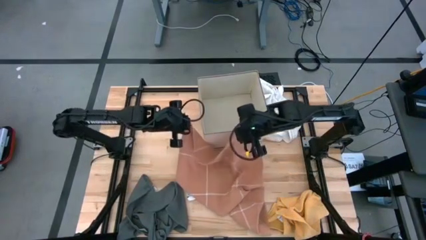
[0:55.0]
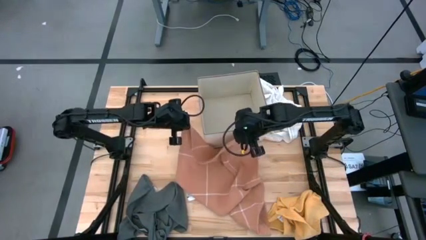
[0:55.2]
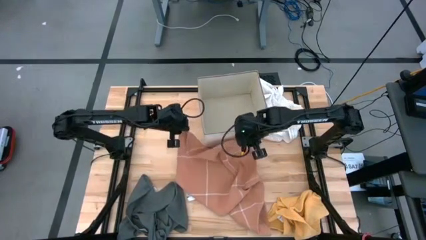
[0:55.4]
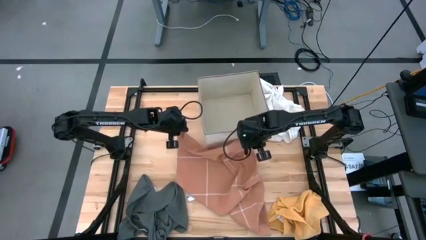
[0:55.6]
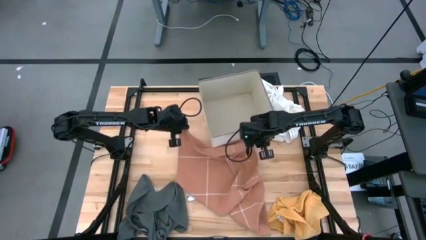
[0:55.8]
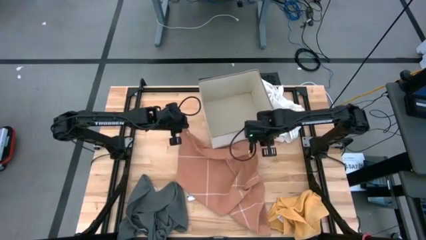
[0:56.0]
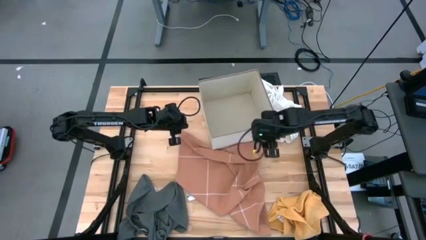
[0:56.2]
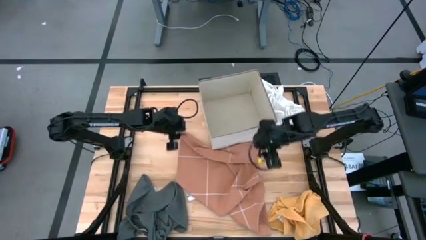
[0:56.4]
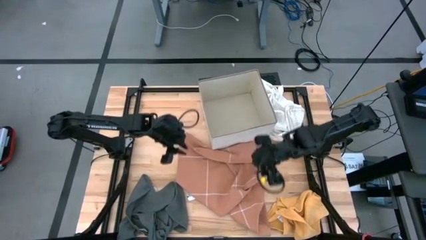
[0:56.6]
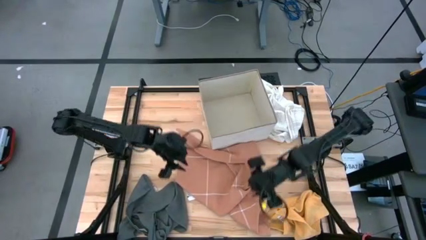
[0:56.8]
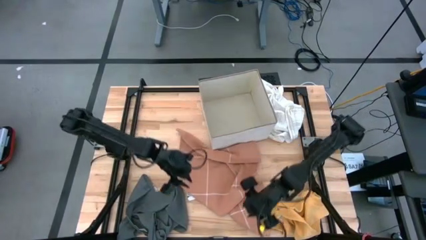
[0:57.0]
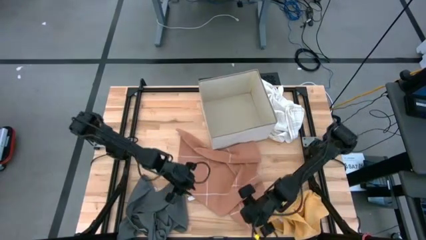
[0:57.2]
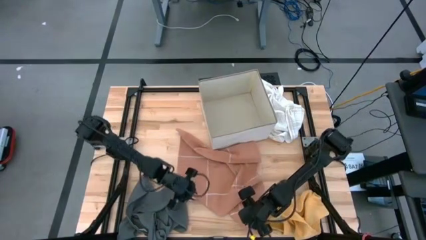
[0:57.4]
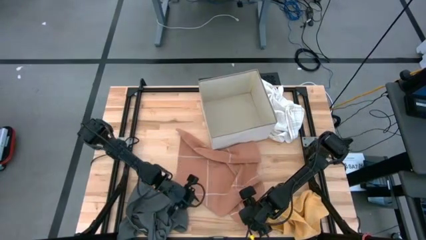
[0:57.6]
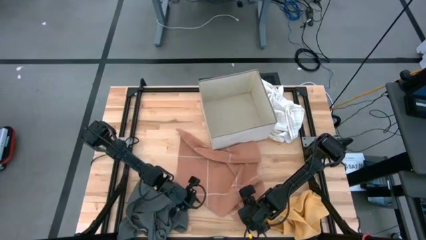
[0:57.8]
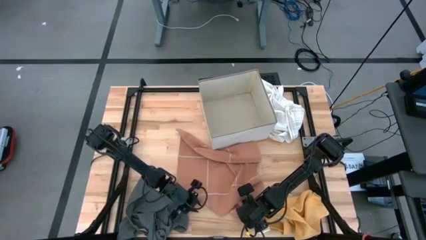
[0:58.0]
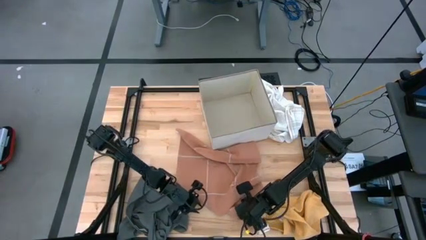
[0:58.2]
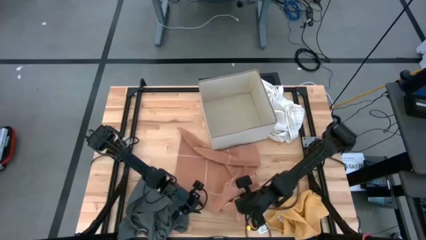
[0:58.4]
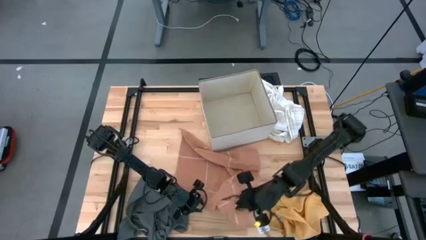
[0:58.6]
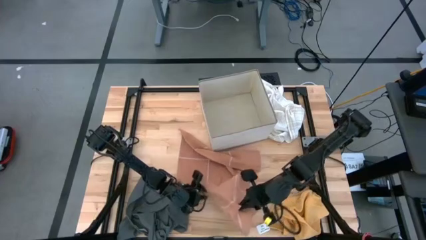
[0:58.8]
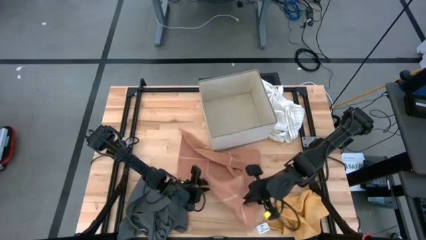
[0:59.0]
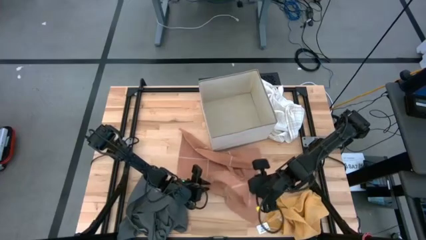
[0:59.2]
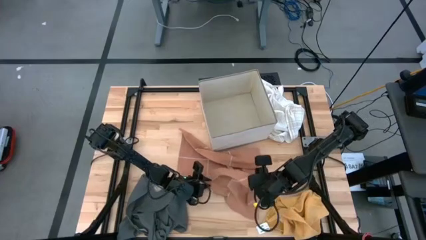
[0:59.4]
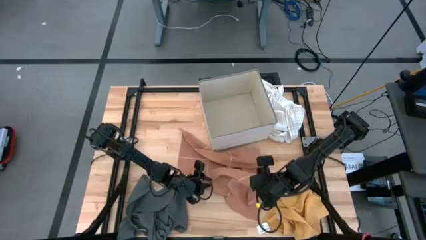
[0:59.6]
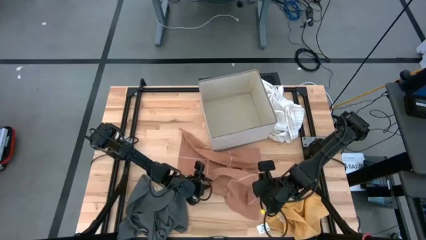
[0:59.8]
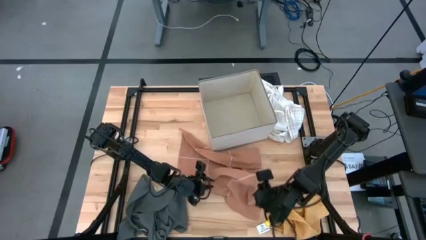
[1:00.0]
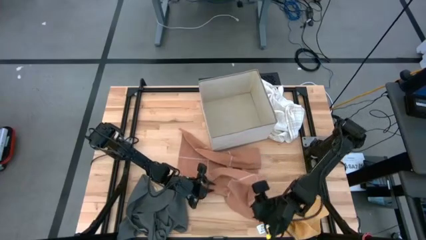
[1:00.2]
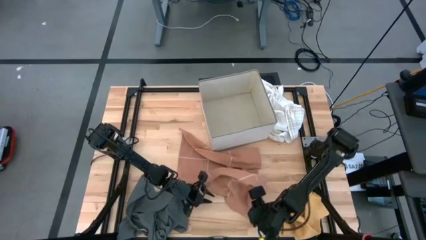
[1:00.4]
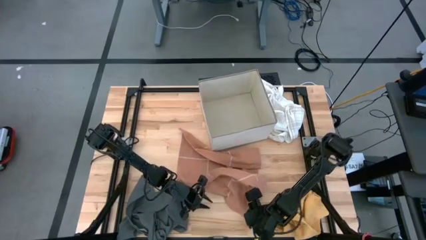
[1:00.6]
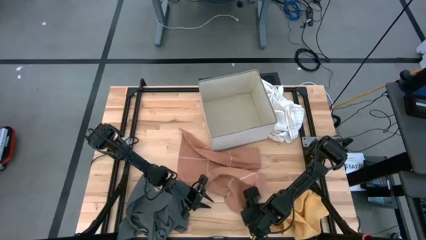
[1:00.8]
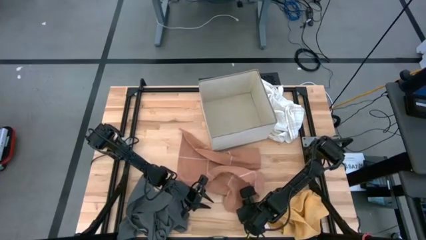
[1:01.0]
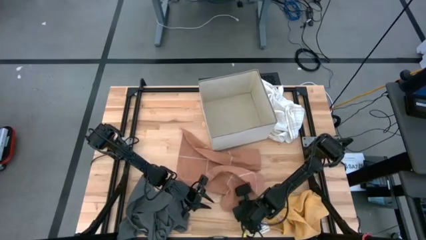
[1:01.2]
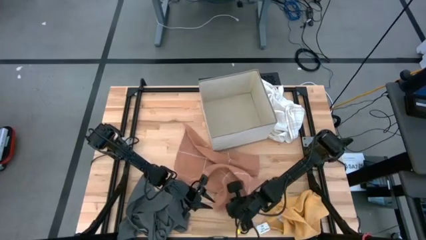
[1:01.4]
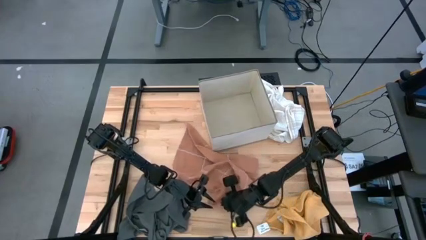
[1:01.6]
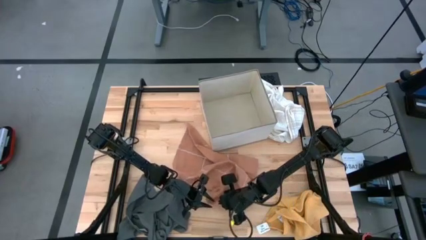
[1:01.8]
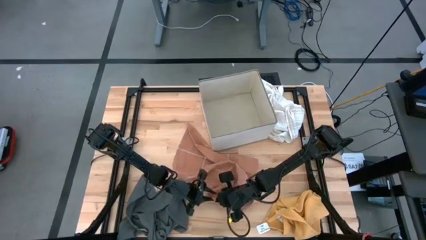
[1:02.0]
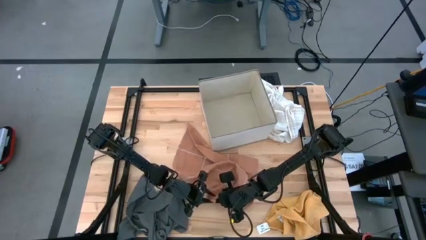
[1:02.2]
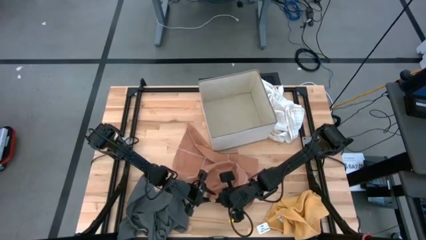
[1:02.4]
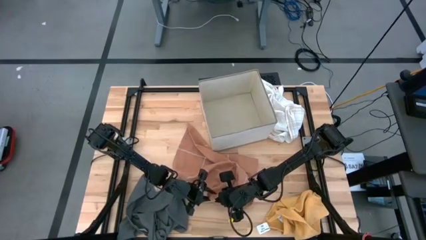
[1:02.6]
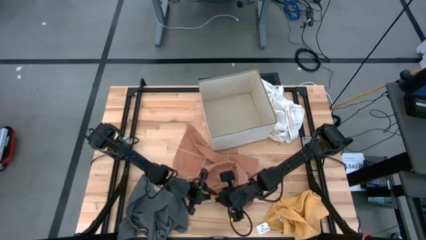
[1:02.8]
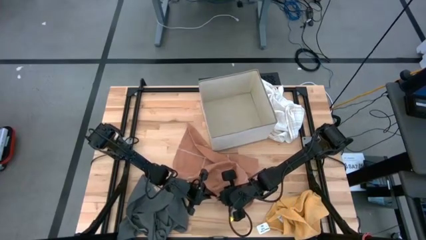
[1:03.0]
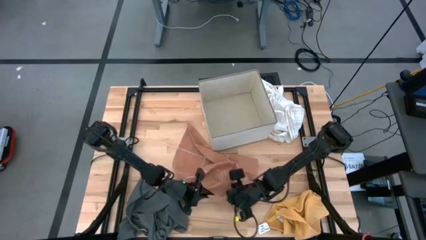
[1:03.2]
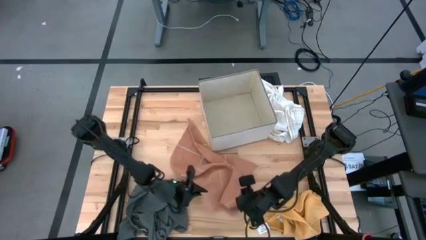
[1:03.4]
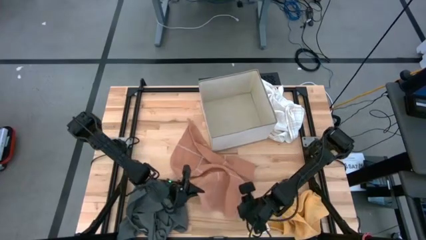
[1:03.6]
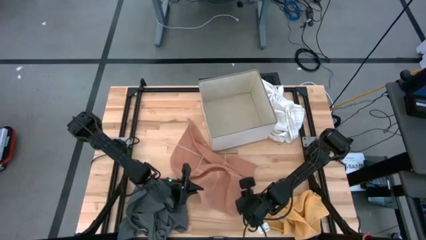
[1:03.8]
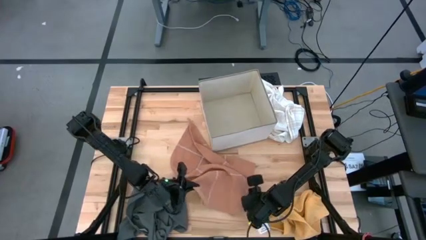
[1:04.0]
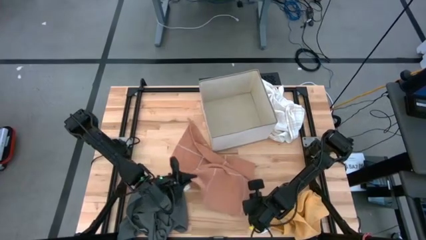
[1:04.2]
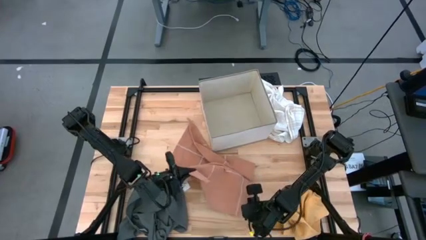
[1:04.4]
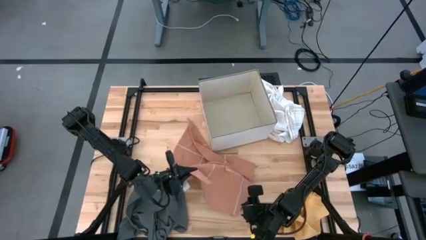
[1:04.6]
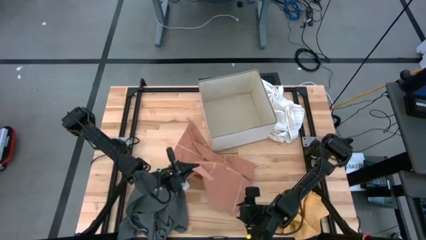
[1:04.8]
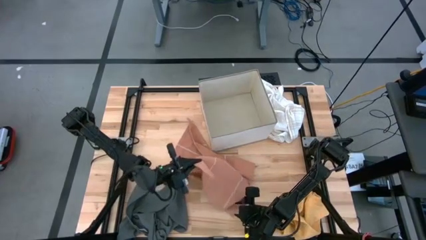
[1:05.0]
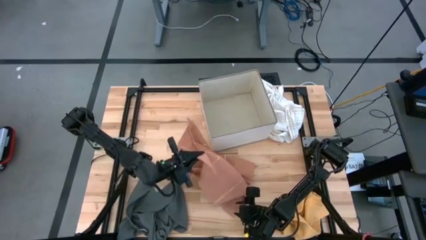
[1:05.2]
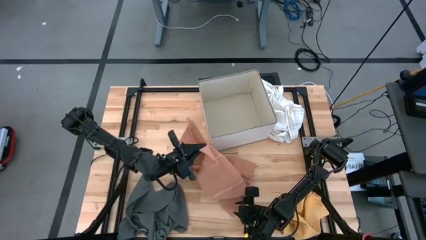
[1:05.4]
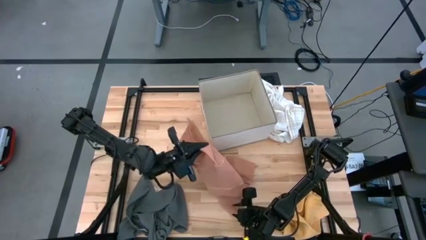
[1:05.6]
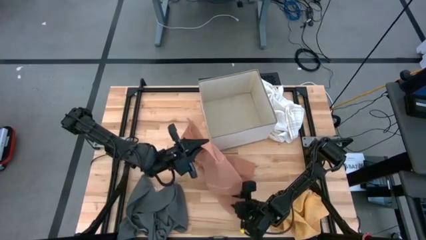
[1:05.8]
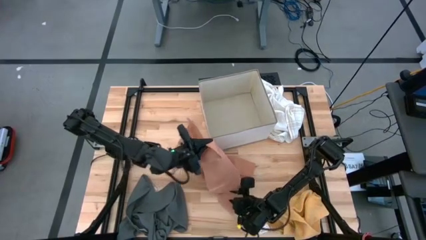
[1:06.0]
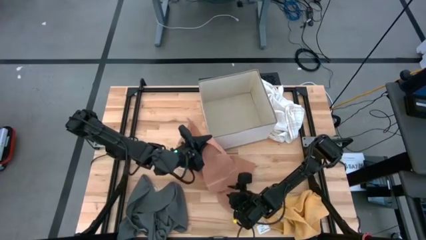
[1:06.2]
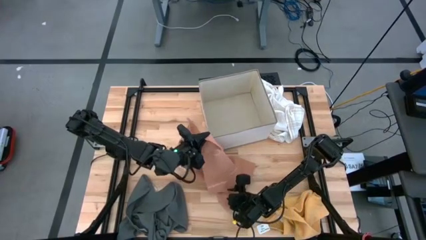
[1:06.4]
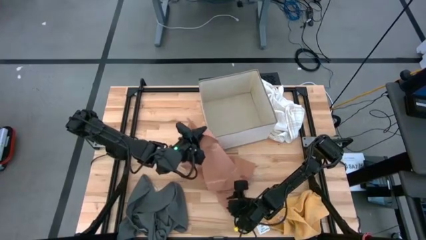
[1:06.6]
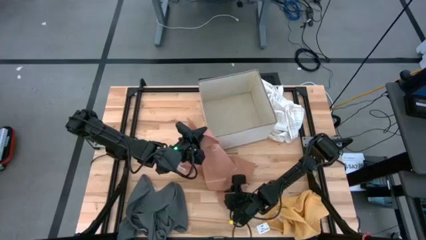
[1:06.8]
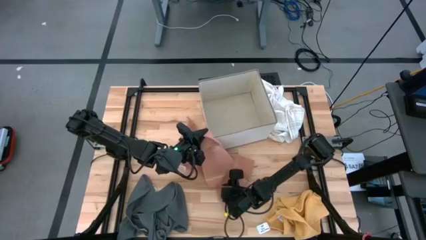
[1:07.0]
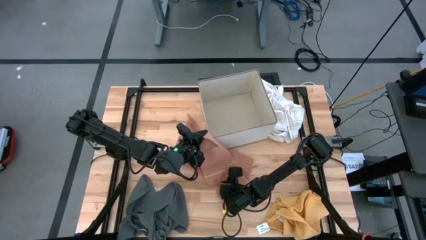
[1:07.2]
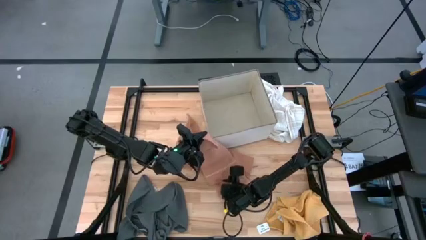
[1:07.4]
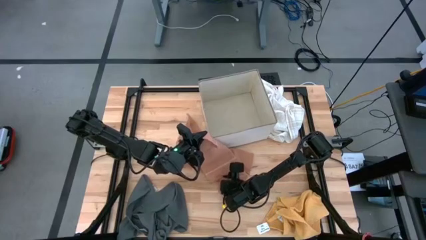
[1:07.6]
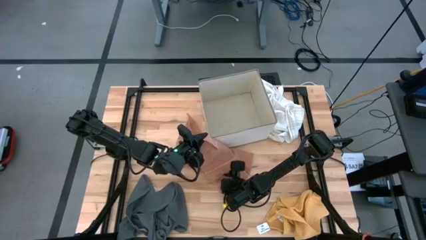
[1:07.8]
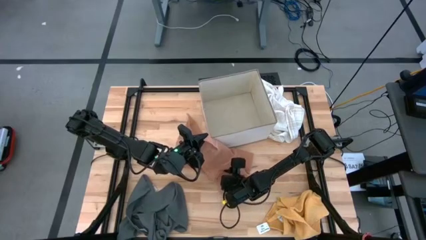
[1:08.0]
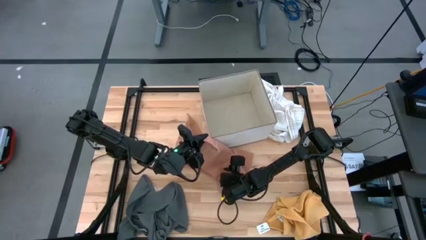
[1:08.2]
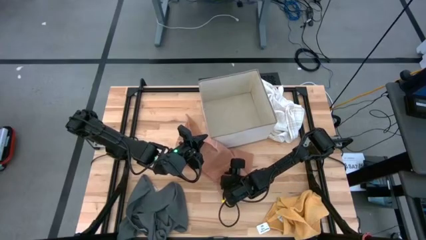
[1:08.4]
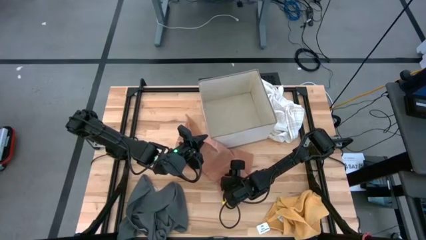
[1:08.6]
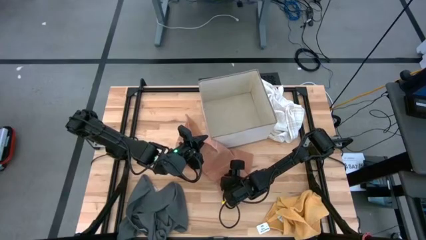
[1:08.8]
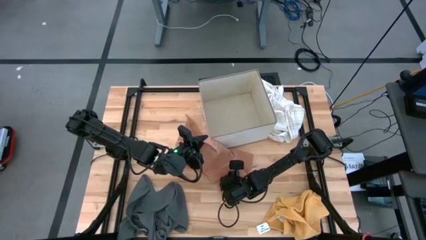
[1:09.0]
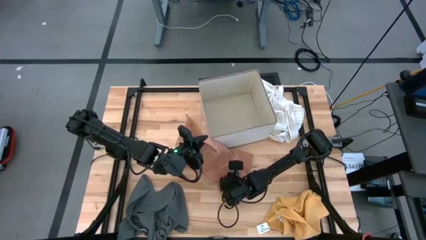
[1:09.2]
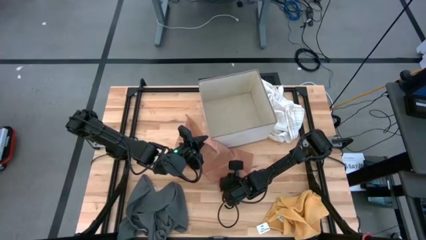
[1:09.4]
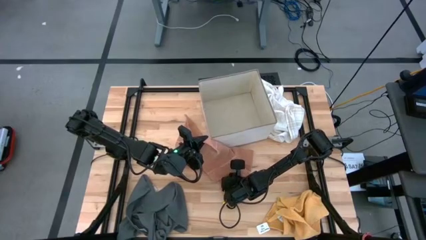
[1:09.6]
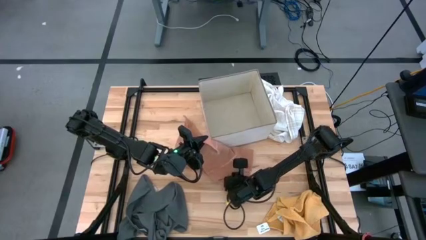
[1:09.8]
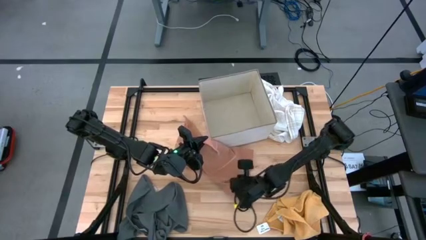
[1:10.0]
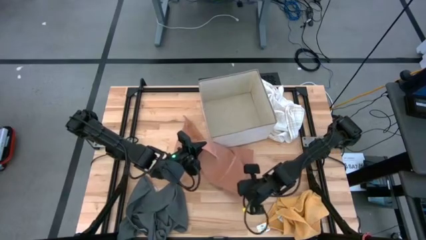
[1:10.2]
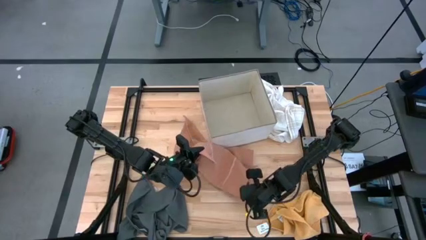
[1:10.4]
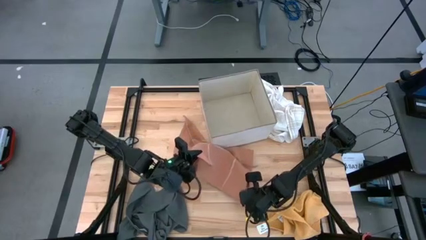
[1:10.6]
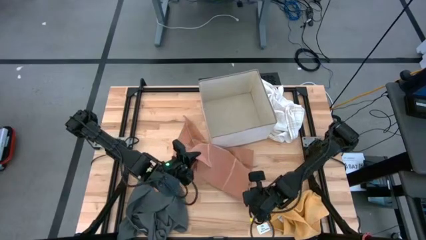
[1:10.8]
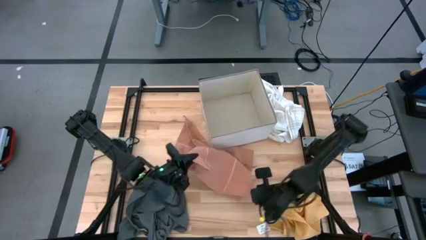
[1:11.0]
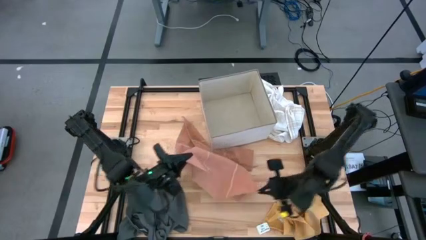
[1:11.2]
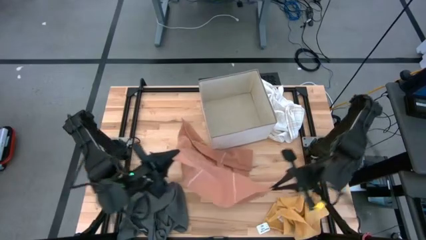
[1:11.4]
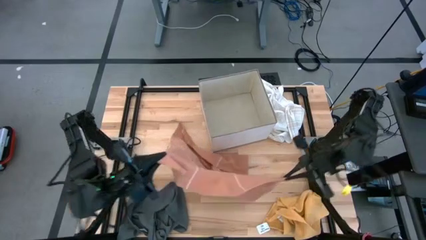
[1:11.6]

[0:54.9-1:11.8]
Task: Fold towel
Fold the brown towel
